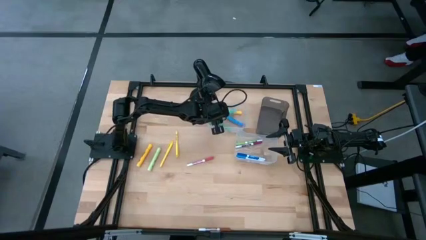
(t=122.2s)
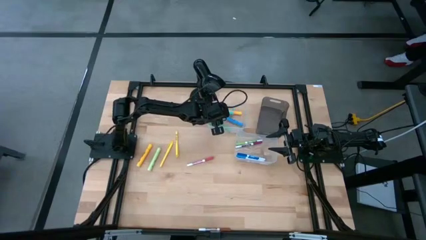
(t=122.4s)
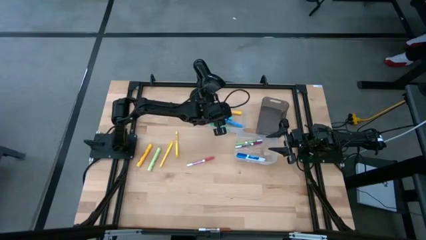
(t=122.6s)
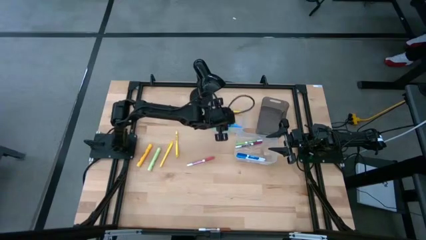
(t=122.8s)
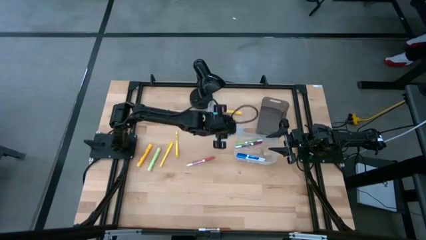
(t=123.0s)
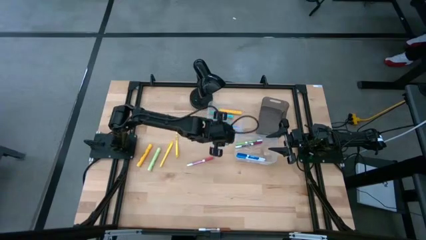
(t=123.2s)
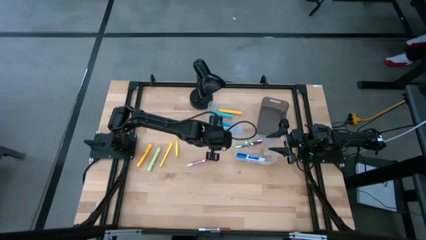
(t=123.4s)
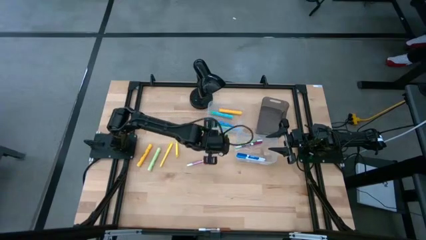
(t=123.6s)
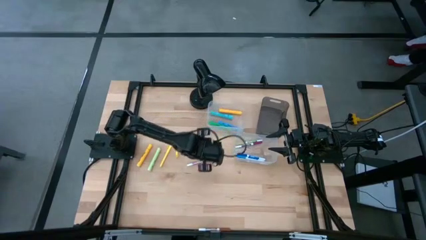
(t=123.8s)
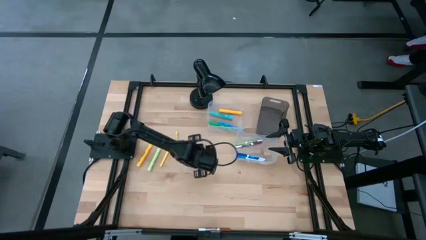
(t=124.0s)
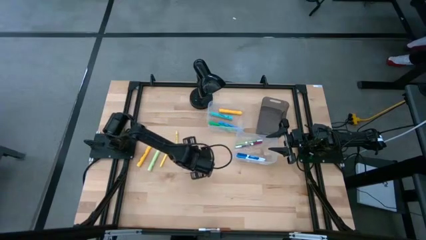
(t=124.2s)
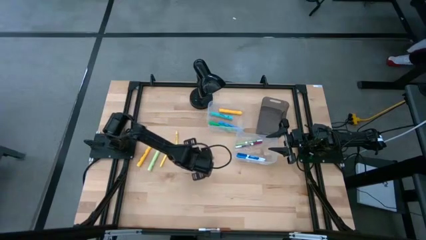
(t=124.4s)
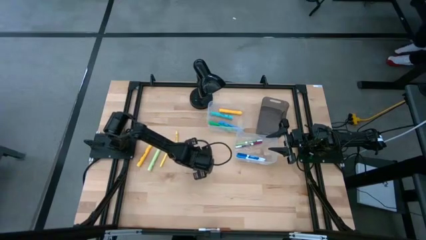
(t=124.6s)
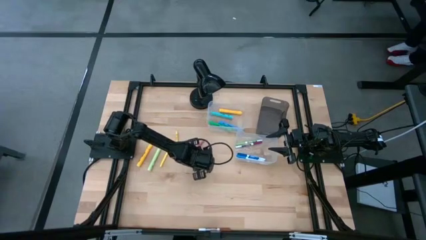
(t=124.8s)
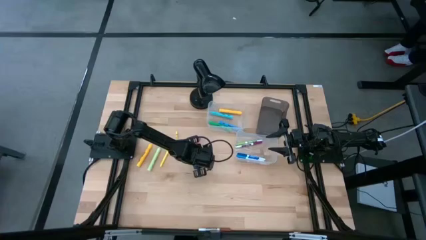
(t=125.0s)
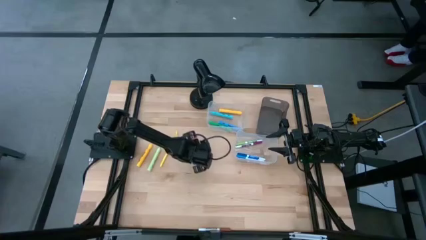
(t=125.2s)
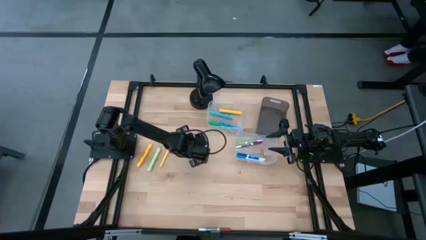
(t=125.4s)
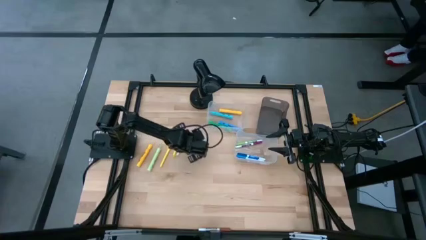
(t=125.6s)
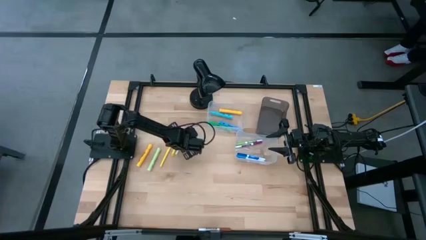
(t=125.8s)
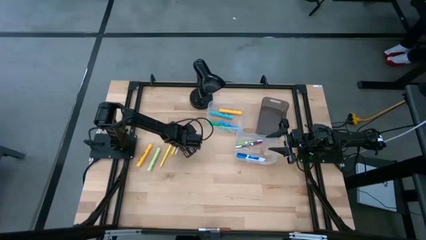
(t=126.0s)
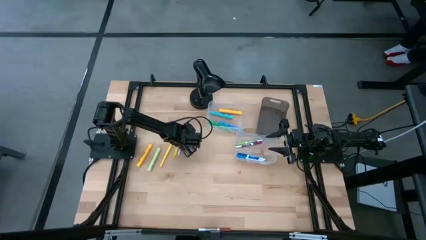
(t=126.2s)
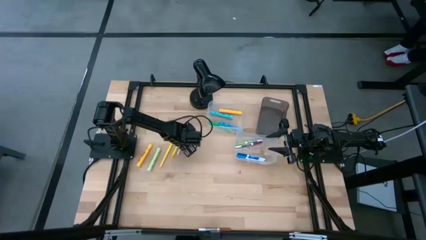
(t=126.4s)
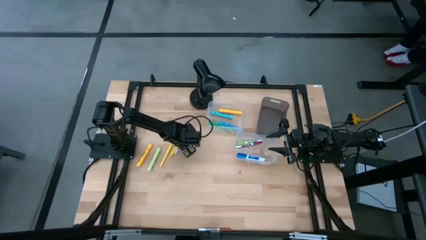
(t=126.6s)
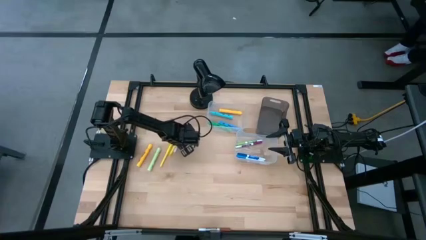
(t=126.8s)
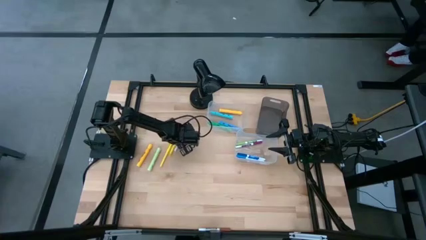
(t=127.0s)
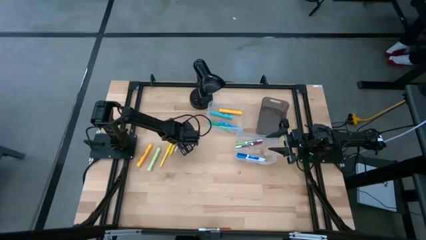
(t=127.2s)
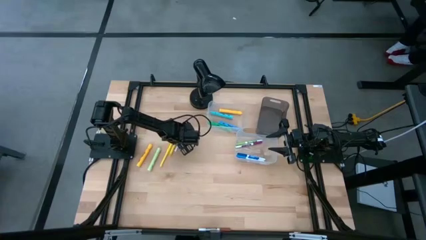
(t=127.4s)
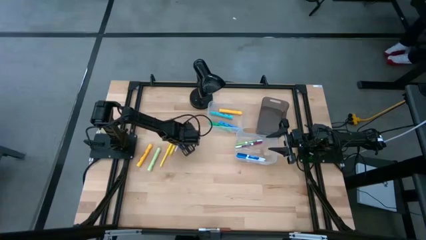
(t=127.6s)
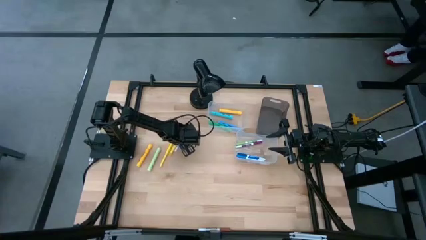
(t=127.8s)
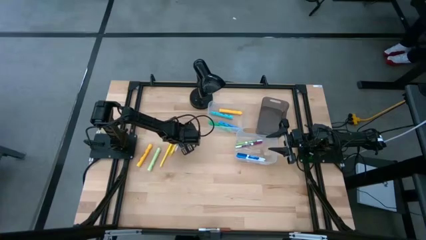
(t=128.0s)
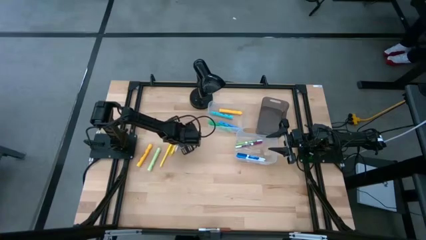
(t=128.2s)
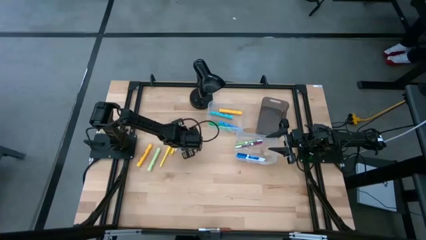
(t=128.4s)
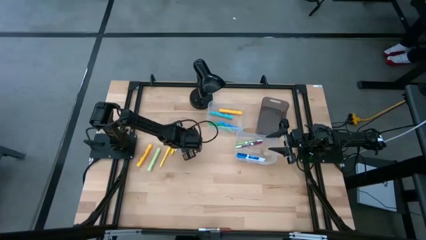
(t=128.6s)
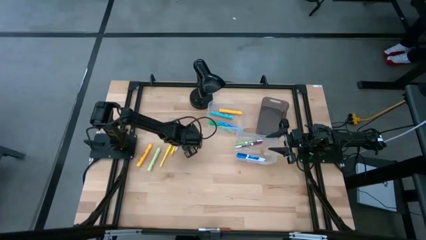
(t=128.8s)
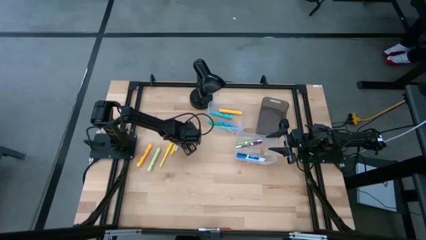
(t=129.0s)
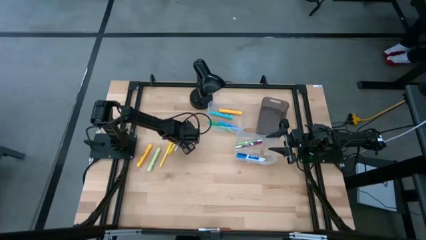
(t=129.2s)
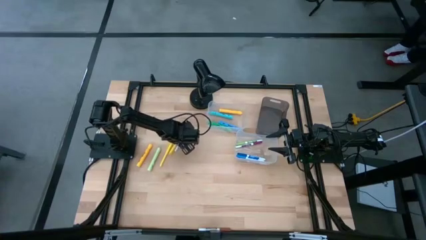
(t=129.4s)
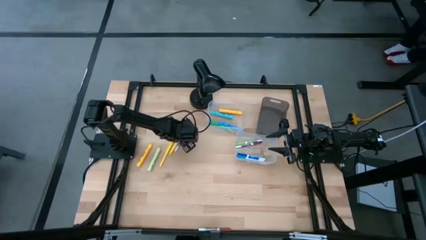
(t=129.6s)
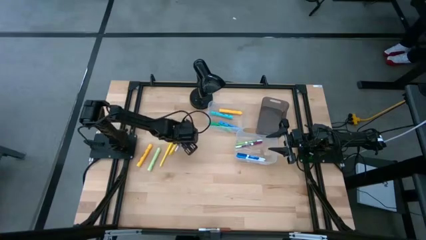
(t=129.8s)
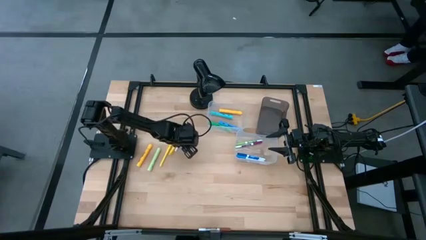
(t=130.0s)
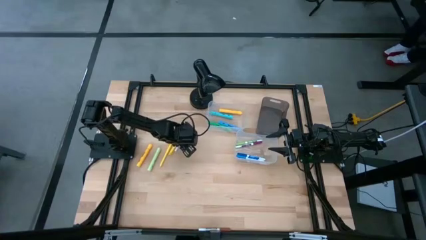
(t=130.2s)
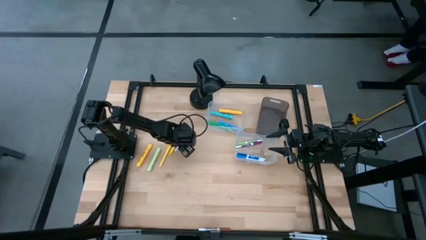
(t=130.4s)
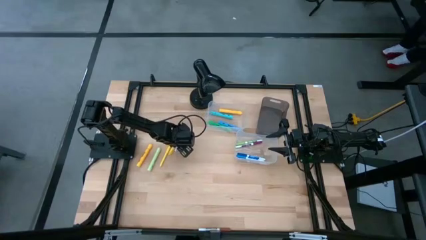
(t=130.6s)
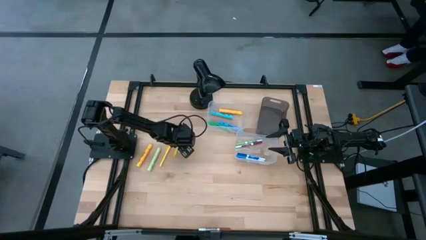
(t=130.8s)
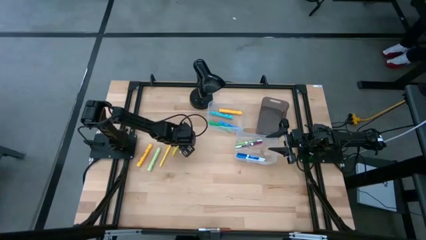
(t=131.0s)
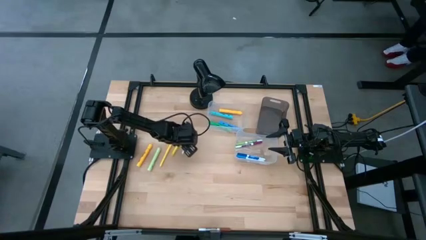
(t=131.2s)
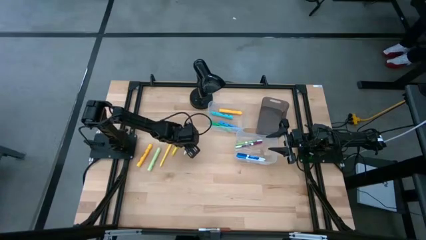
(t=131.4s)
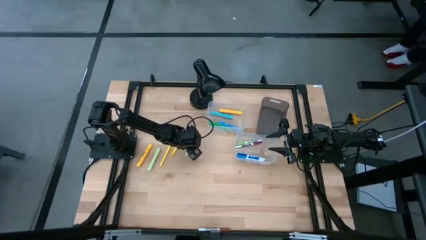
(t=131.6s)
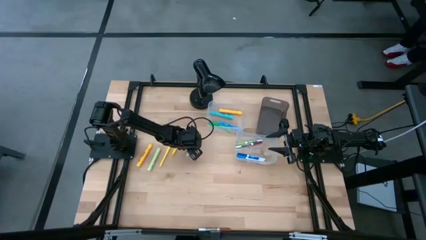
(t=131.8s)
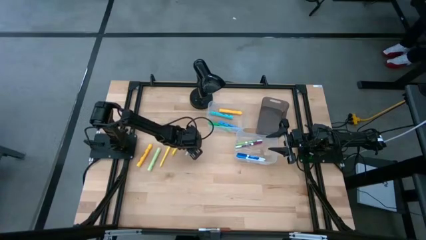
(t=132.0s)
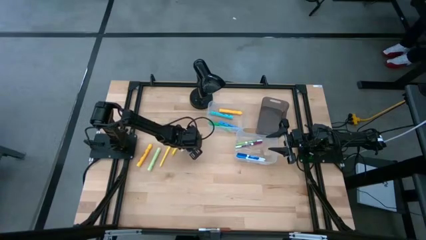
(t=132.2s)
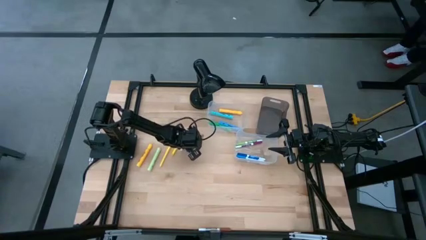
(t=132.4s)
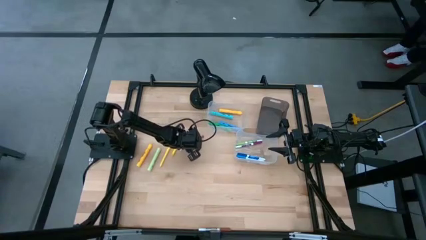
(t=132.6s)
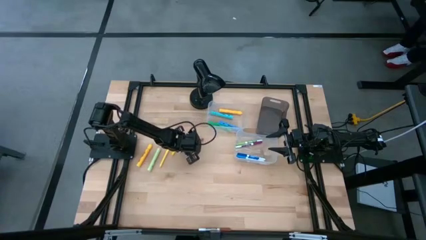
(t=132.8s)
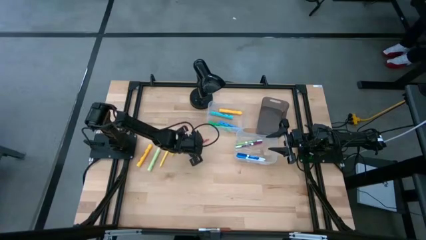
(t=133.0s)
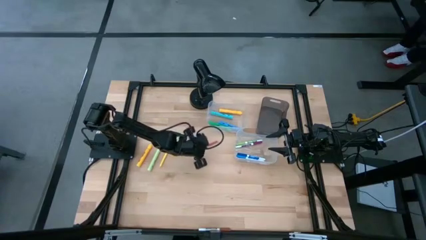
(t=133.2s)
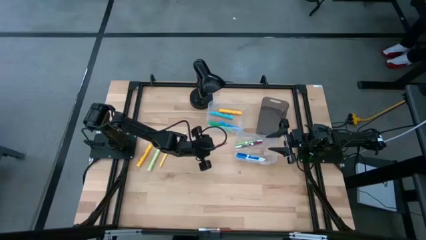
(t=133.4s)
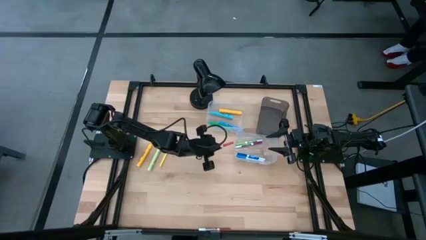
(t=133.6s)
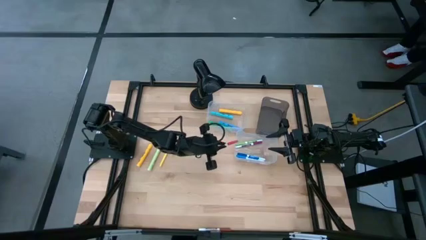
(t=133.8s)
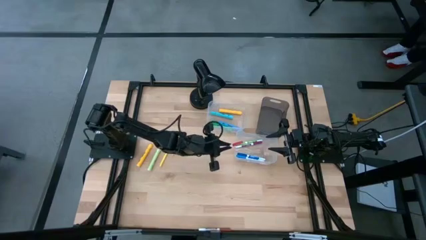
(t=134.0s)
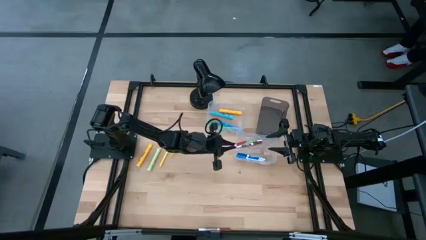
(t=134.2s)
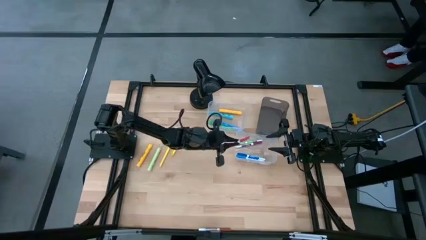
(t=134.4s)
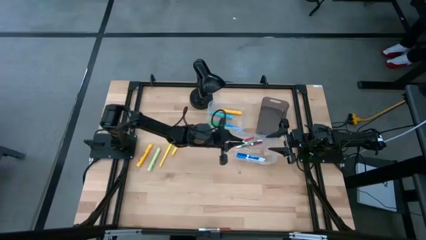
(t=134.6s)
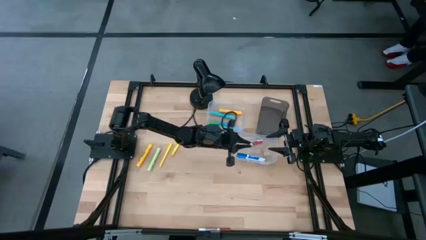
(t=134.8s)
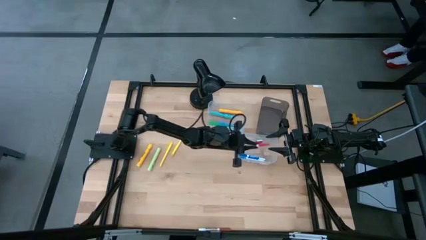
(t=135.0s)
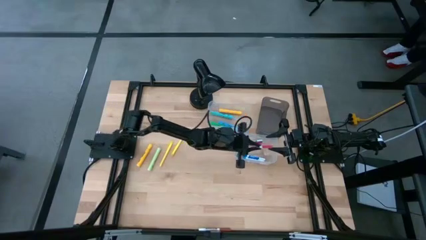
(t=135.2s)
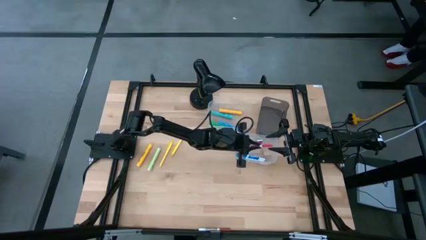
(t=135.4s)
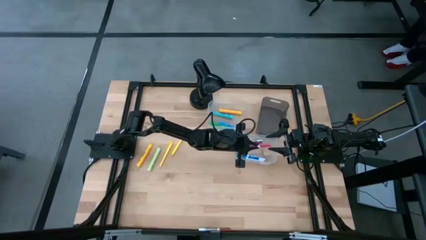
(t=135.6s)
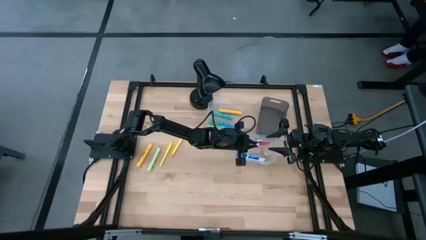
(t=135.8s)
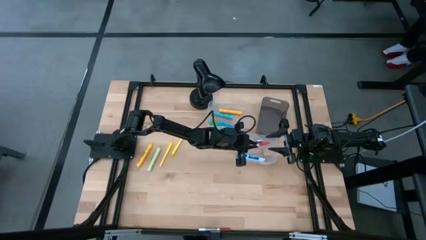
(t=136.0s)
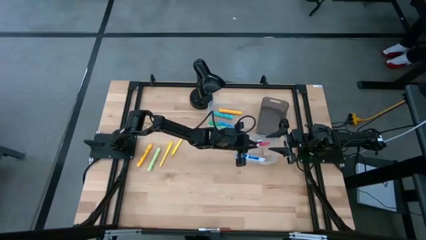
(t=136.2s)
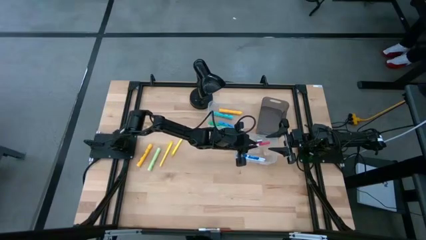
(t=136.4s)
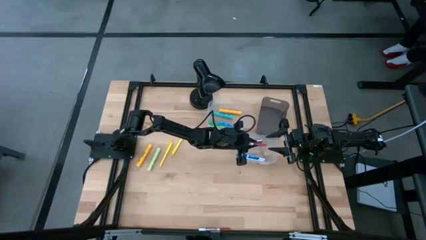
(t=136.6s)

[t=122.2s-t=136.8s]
Task: Pick & Place Markers
Put the pink marker pen into the bottom transparent bin
